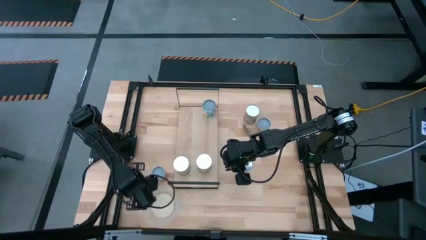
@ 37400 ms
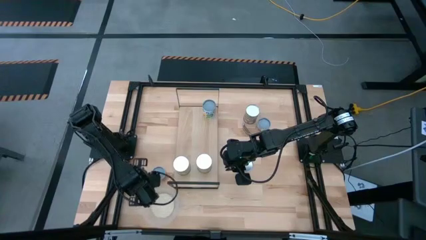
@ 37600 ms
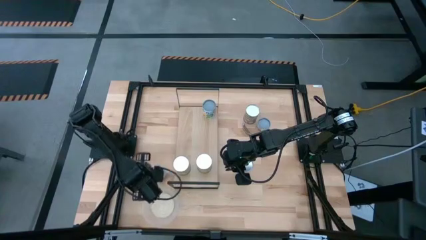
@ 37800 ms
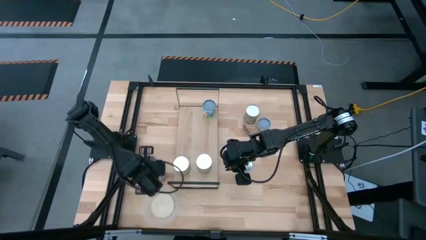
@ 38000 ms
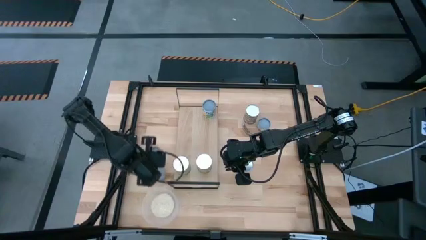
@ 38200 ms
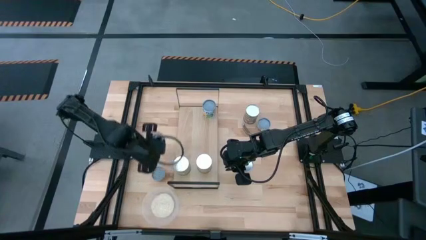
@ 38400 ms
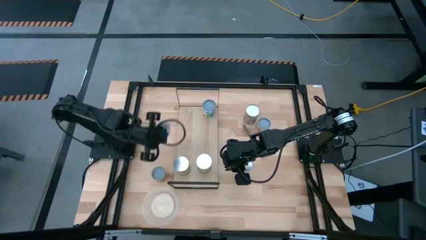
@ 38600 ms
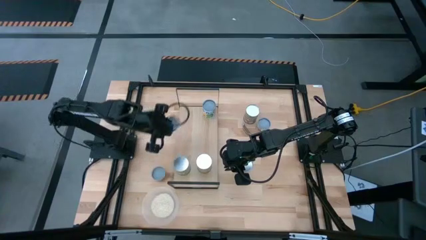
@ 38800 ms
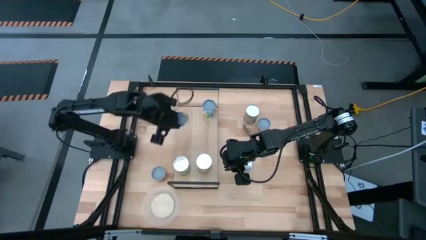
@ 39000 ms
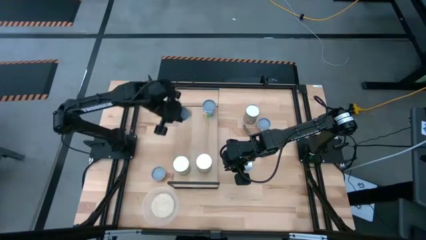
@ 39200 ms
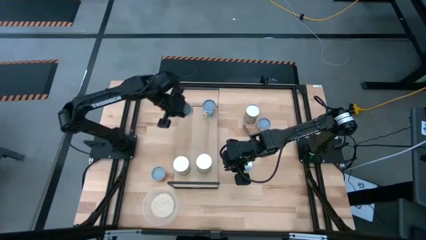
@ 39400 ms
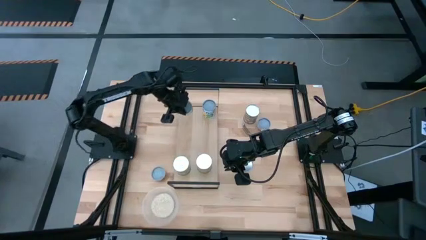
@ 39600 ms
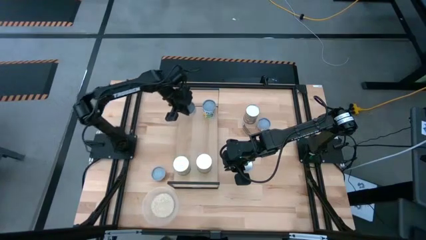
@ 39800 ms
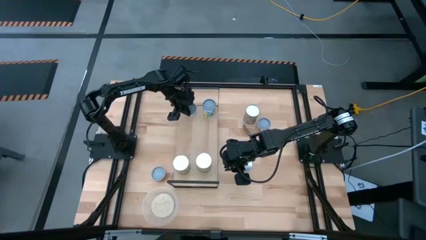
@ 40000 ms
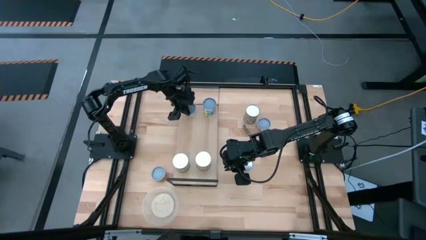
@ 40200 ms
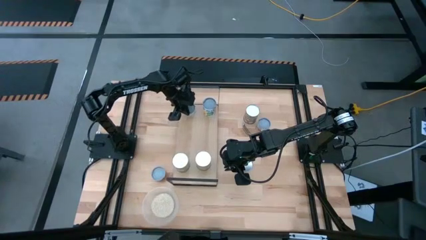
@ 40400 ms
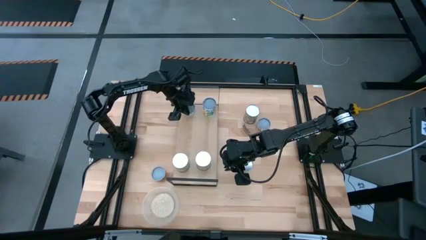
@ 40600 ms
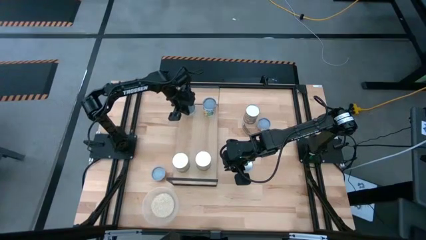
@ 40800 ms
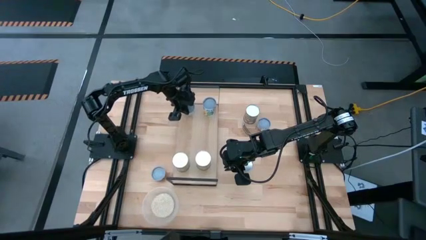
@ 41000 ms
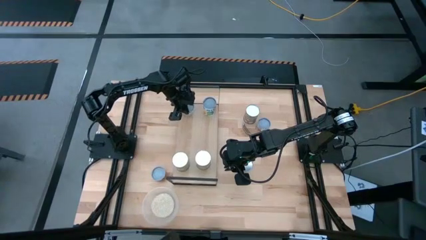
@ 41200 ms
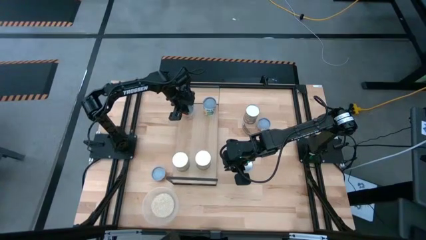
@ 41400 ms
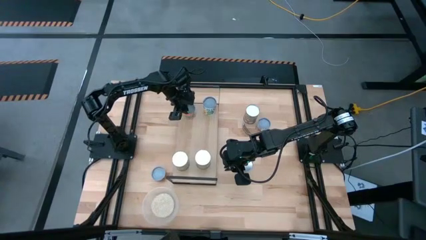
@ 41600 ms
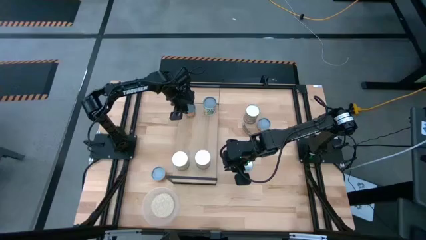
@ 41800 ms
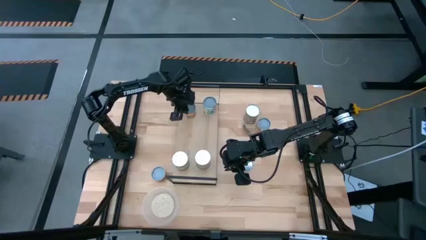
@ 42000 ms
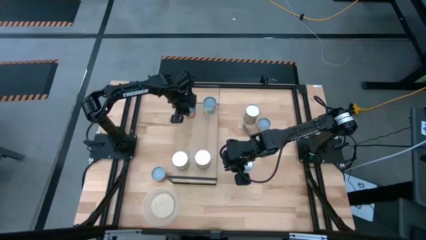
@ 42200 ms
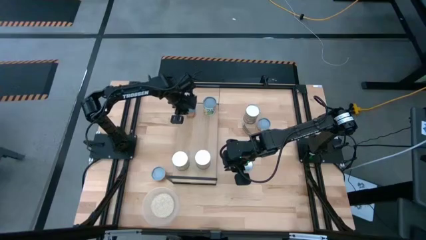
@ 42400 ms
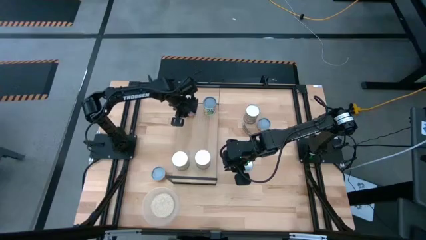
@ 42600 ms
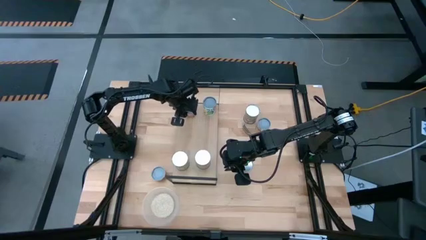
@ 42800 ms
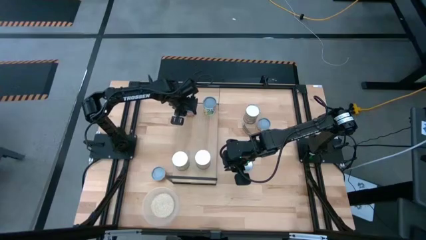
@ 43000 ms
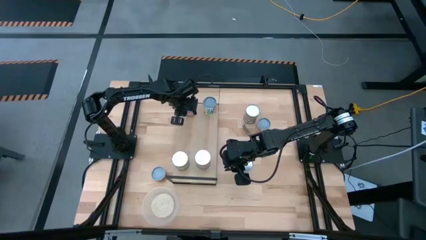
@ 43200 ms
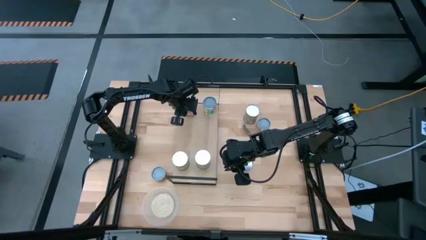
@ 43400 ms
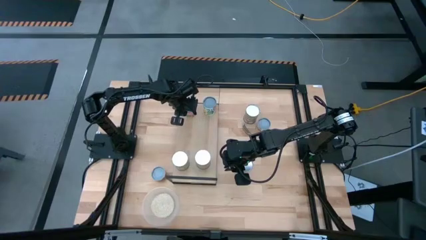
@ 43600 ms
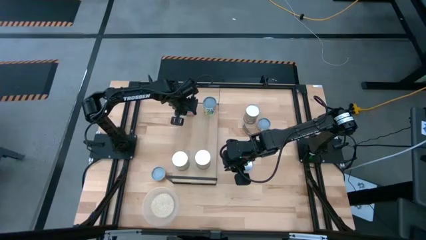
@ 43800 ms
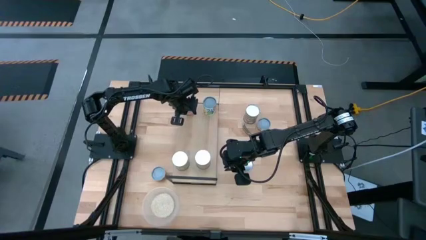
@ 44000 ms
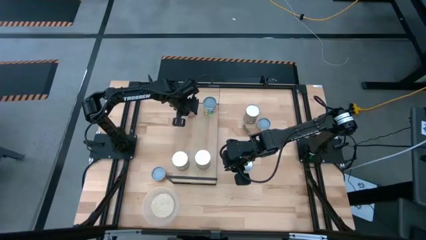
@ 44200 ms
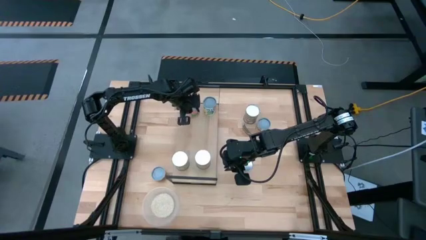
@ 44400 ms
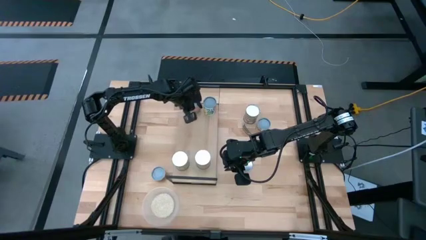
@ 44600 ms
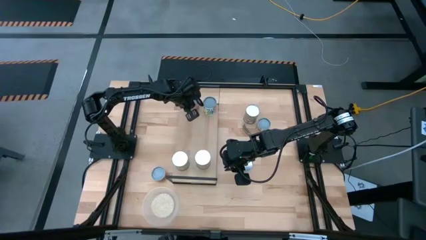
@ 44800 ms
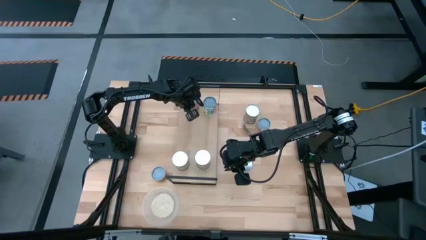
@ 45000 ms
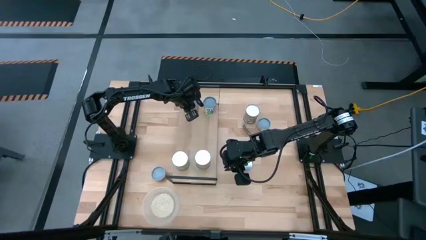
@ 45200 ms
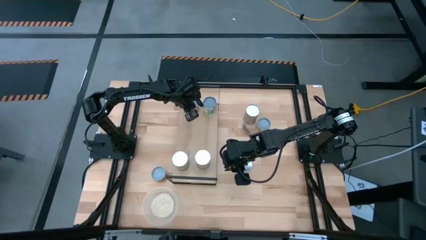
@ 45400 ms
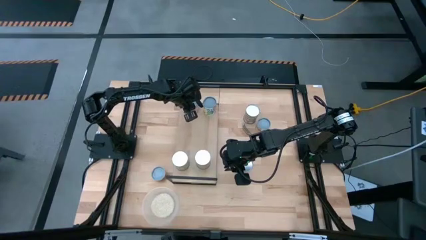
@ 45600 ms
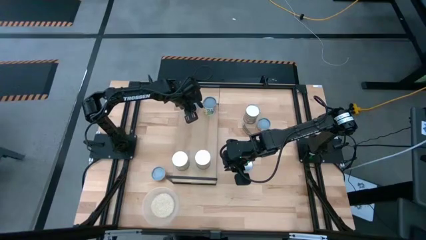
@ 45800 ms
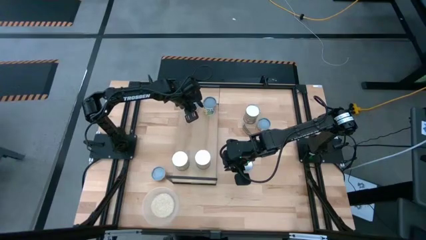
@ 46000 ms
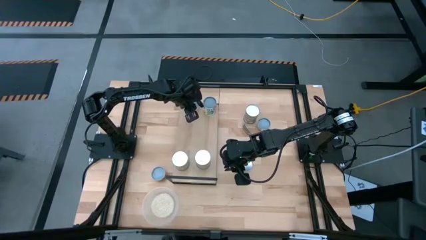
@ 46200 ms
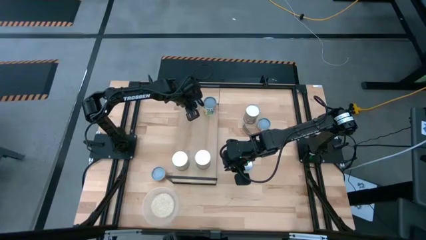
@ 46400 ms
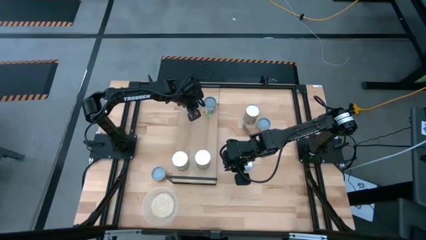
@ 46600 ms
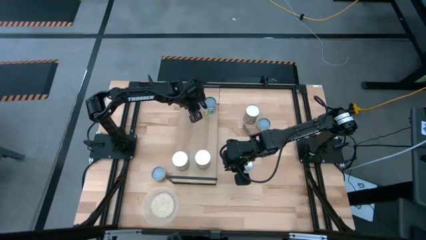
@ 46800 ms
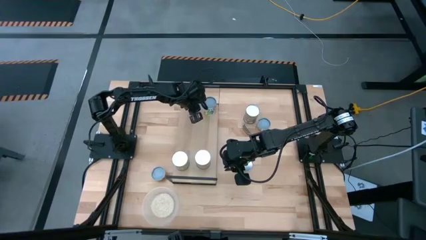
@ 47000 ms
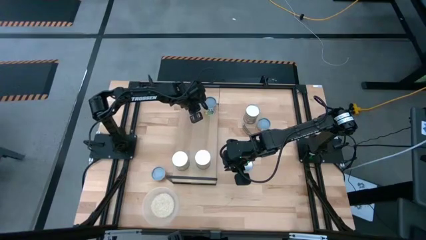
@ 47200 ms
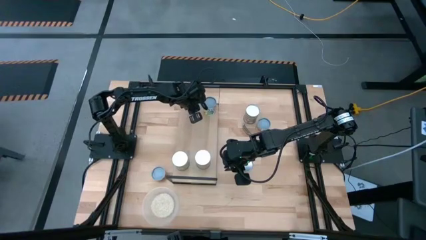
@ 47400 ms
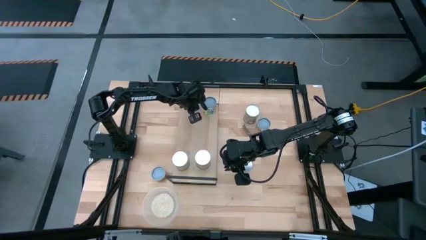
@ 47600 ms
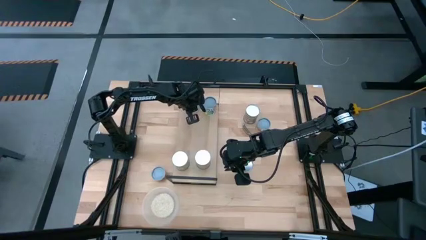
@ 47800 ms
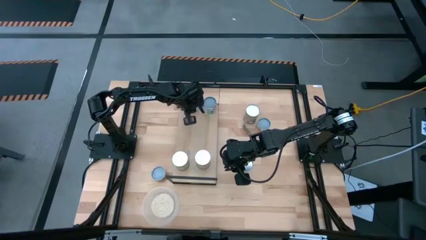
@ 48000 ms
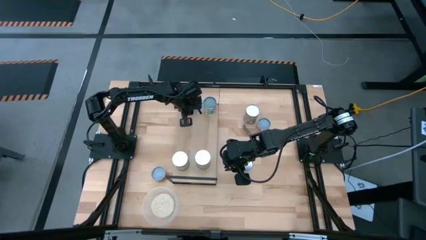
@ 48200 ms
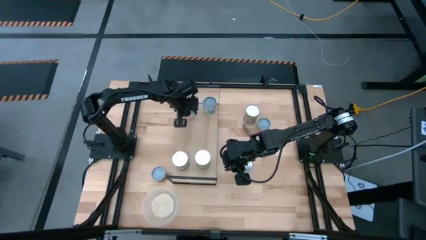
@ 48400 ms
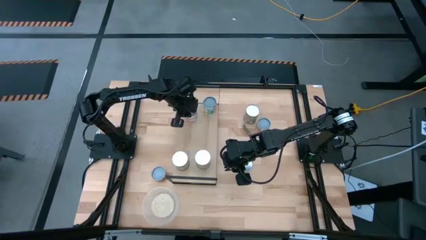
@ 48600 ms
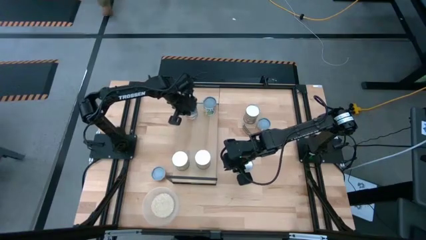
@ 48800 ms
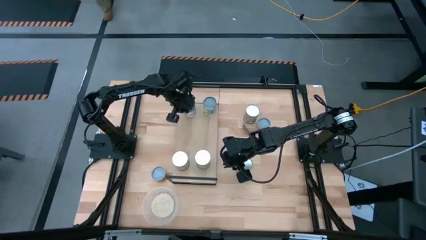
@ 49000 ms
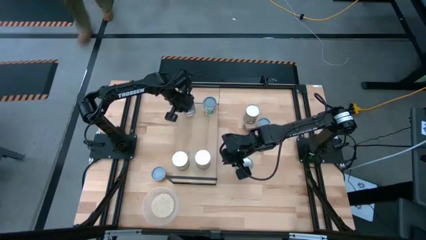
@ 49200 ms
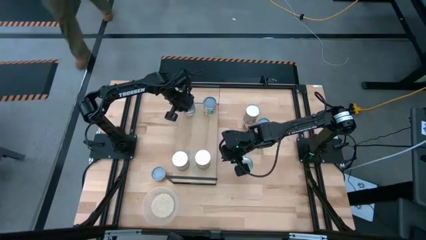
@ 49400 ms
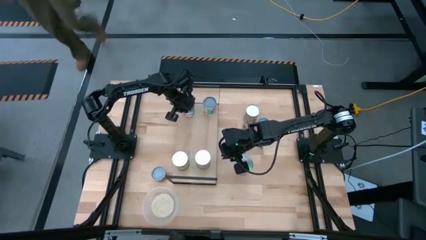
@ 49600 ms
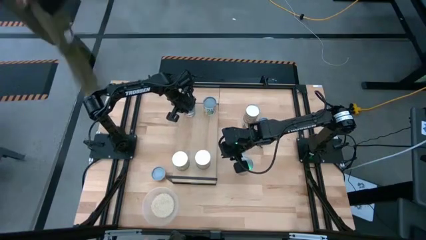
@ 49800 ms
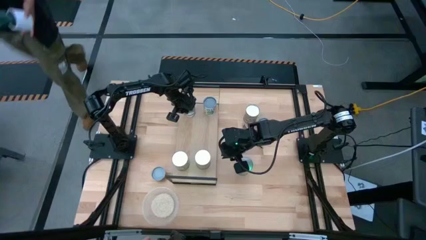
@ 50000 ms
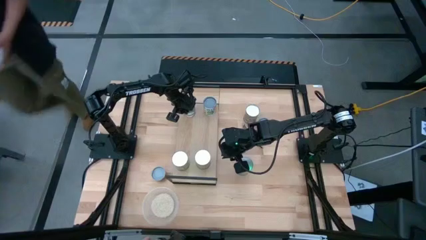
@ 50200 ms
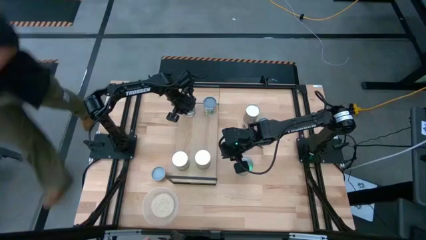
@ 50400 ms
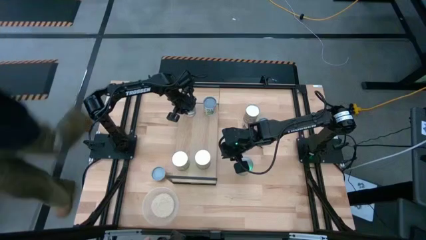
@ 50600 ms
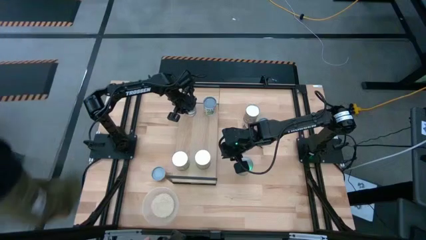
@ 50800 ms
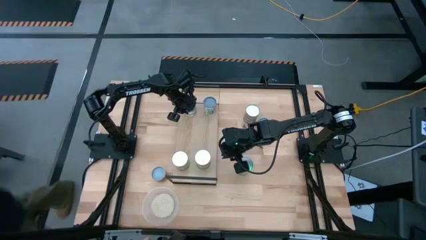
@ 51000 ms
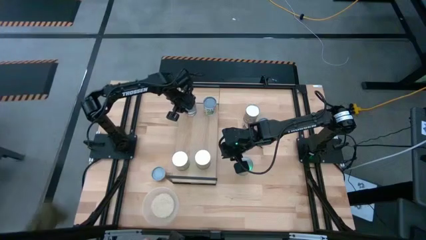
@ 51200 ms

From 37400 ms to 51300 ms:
Task: Pick and place cans onto a shelf
Put the small canned oranges on the shelf
